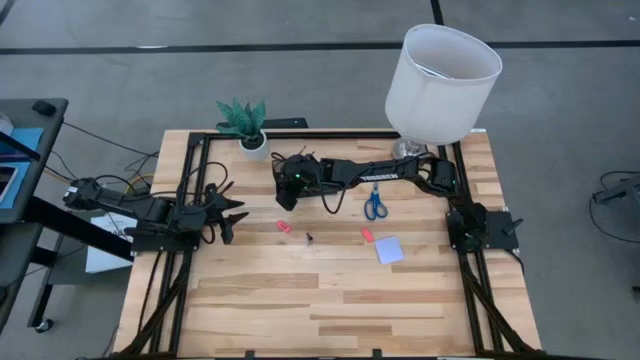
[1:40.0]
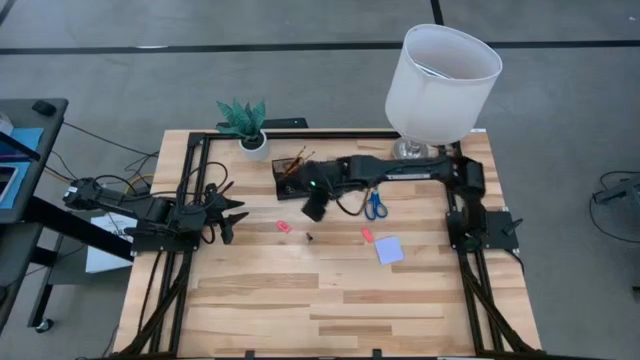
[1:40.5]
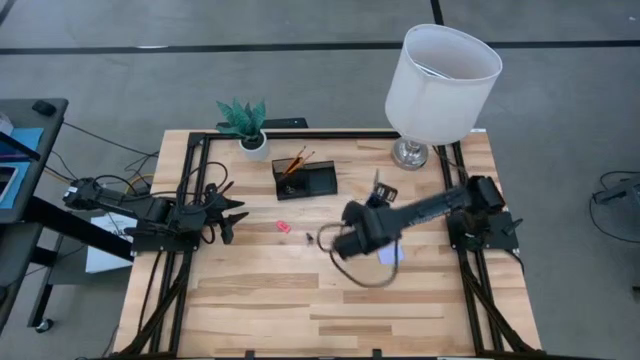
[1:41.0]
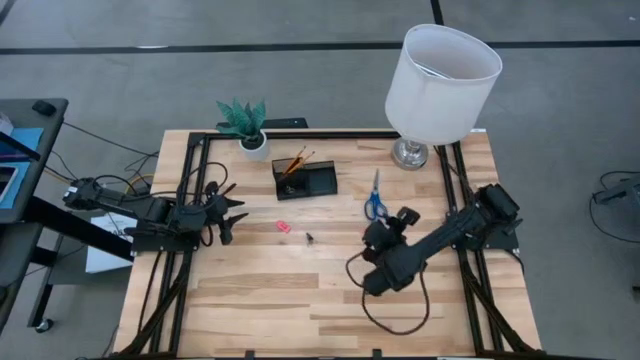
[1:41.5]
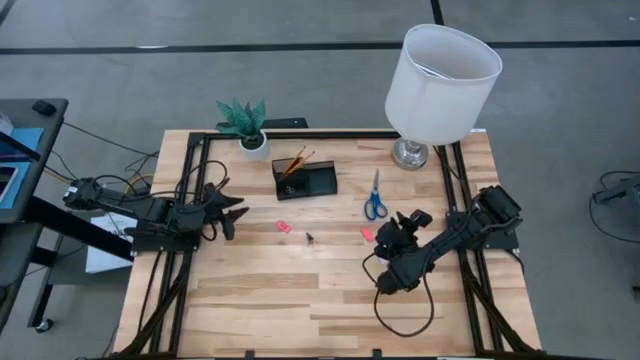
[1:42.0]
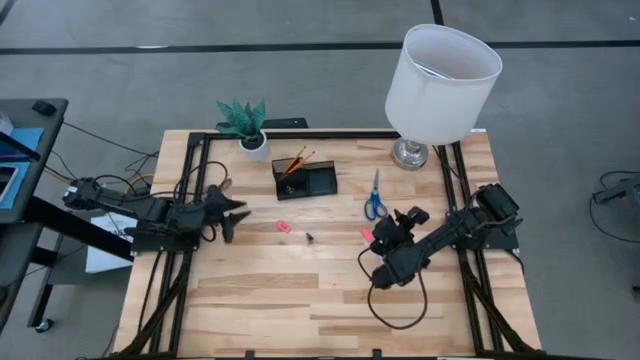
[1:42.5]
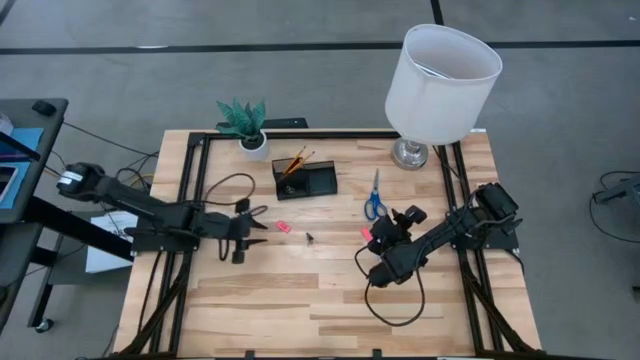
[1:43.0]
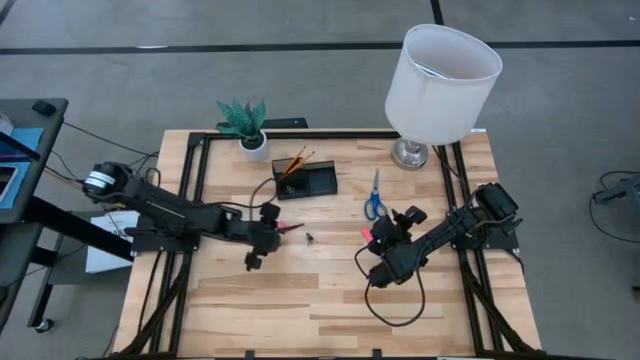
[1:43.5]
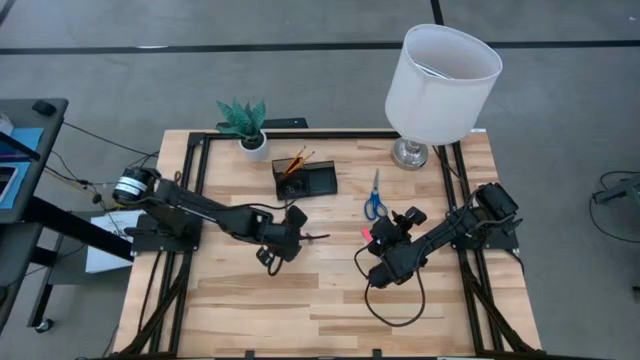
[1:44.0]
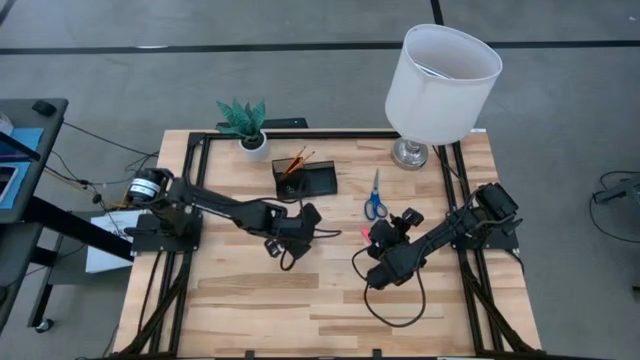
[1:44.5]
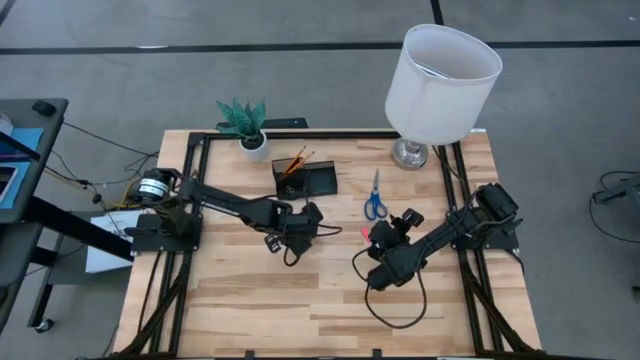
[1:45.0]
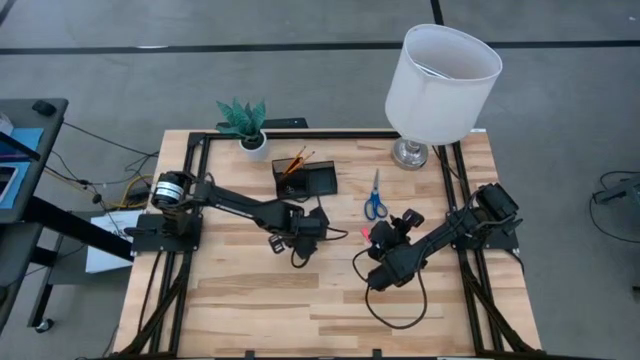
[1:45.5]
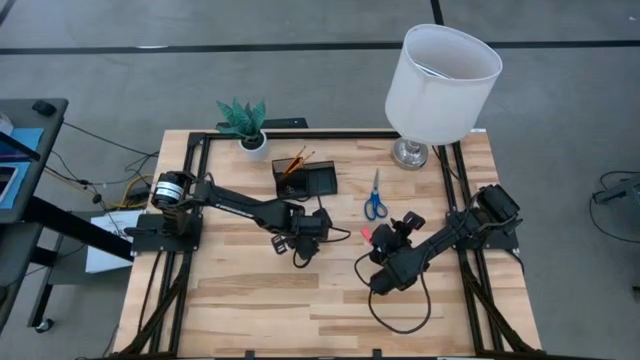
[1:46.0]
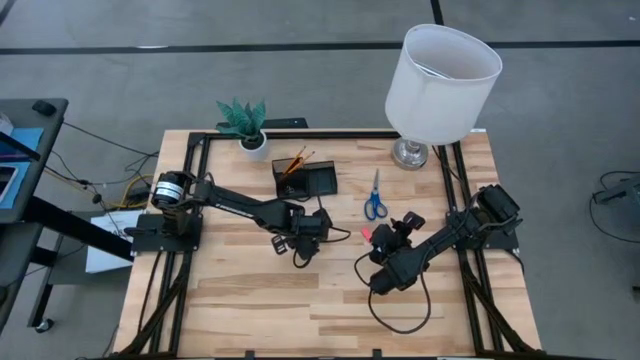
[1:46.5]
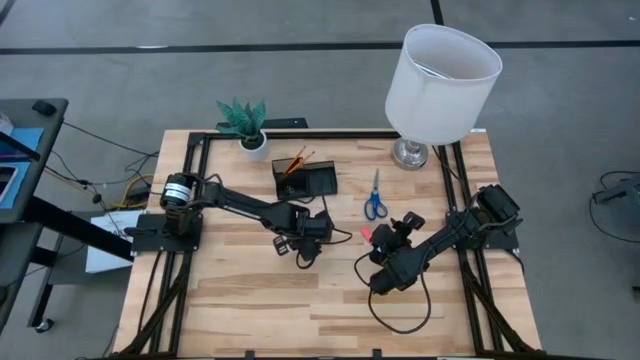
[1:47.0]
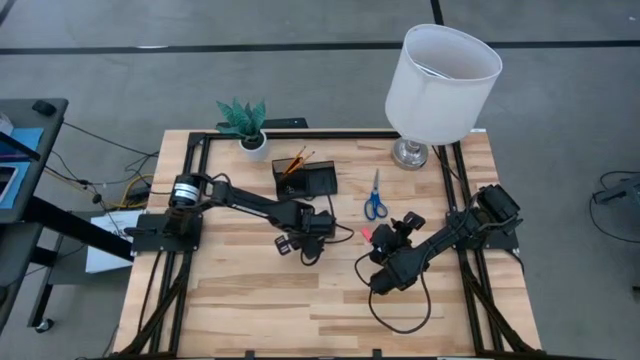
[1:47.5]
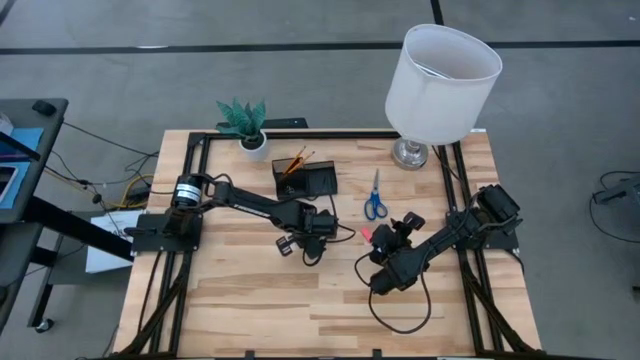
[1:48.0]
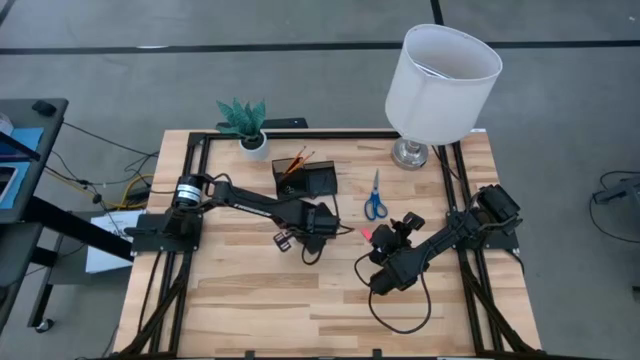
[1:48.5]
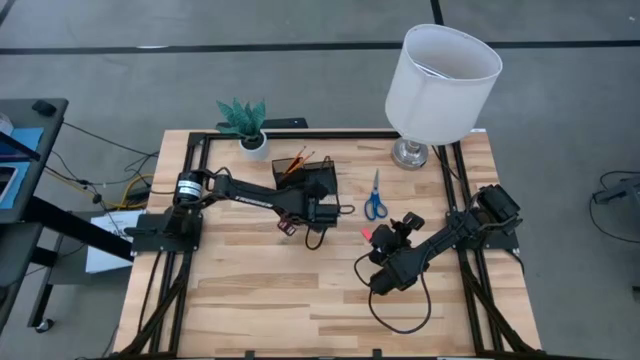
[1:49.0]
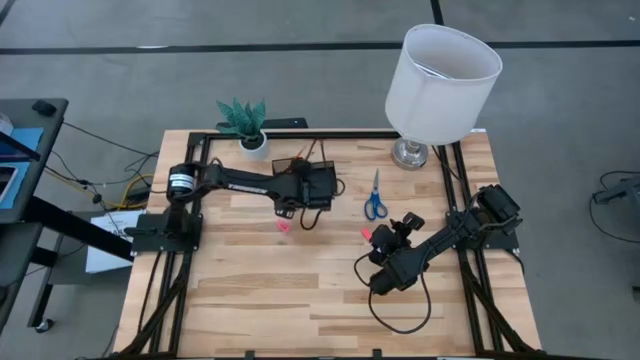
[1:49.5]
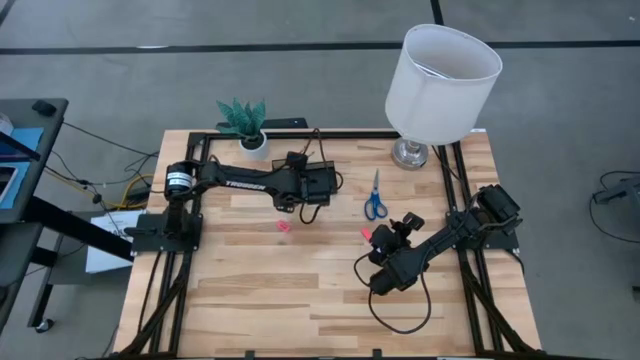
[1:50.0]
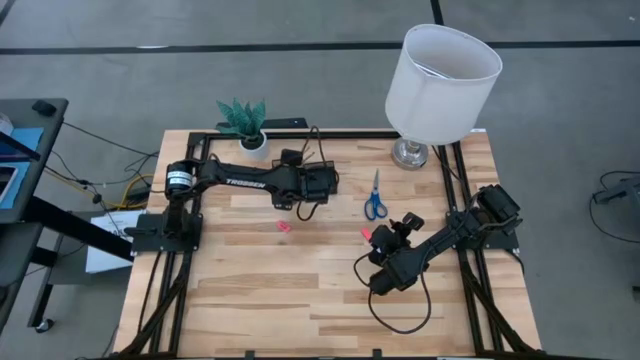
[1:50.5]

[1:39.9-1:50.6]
Task: Pick and place office supplies into organizer
Put the black binder clip into the black desk organizer

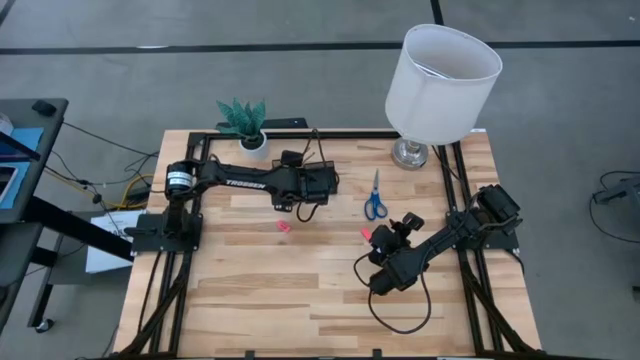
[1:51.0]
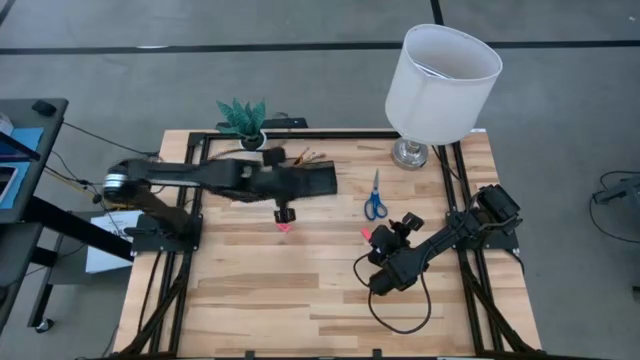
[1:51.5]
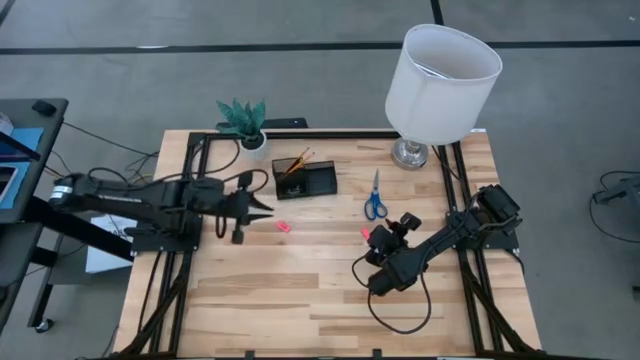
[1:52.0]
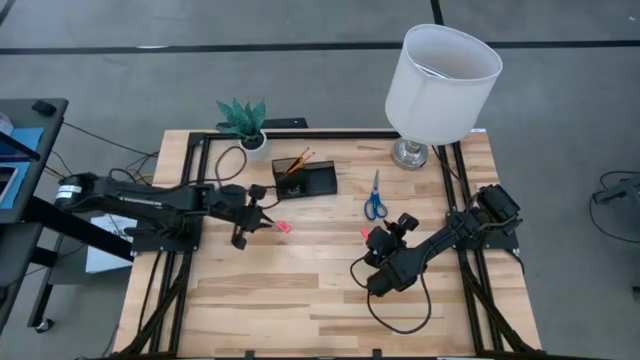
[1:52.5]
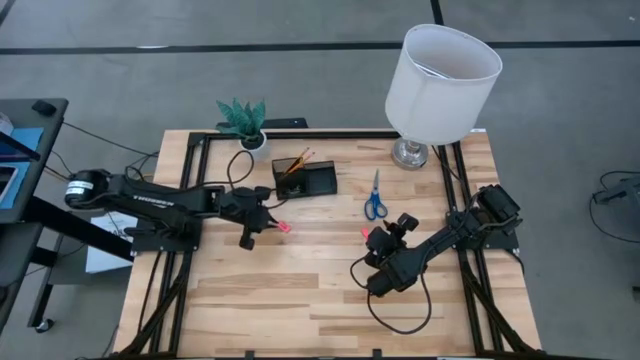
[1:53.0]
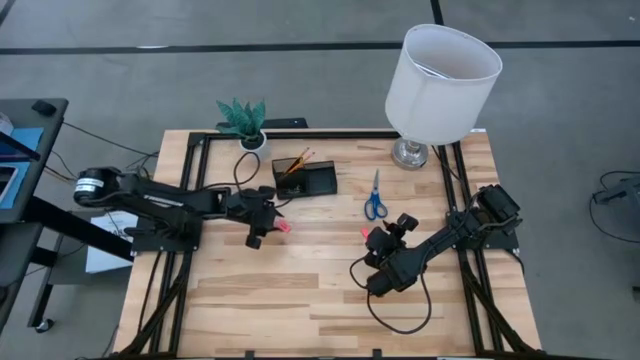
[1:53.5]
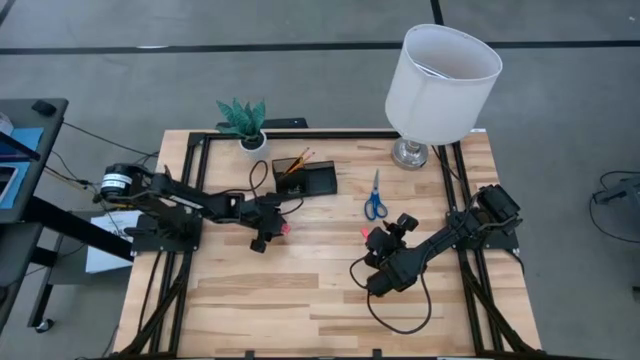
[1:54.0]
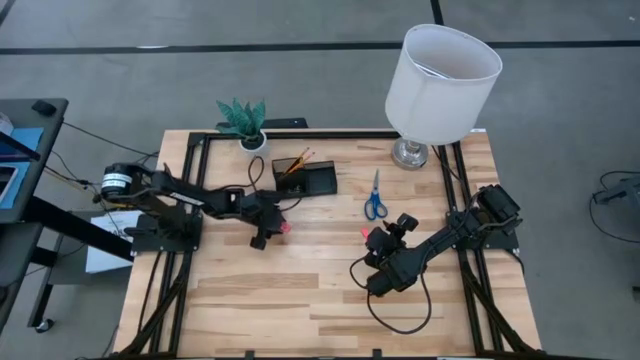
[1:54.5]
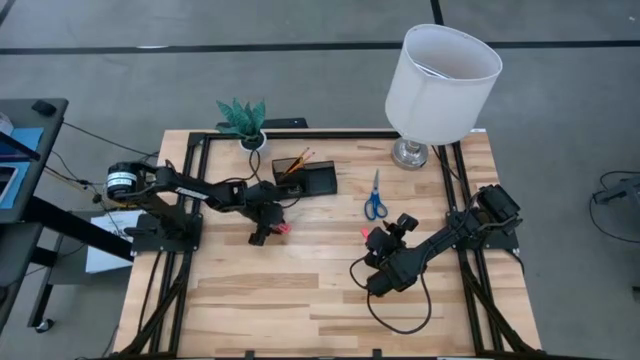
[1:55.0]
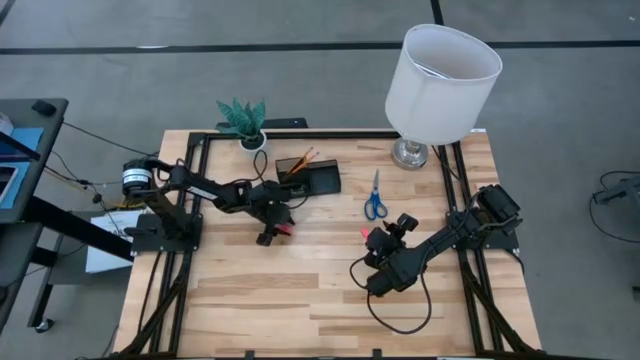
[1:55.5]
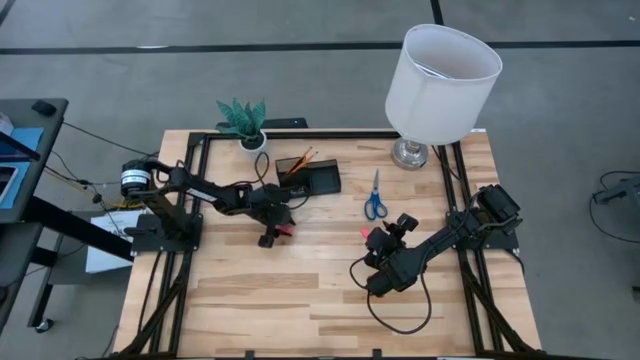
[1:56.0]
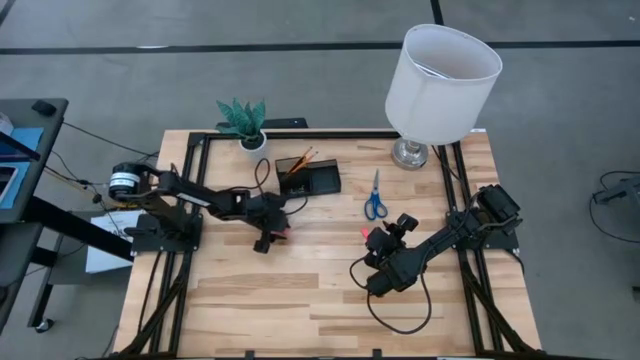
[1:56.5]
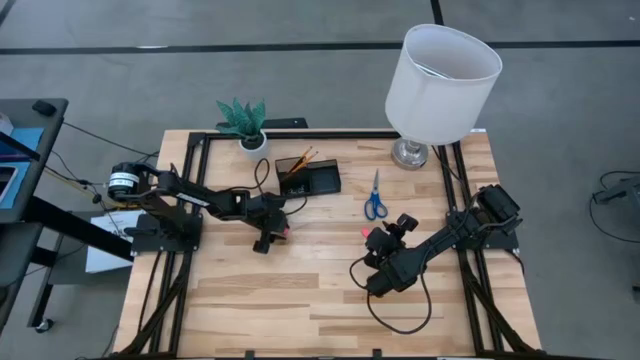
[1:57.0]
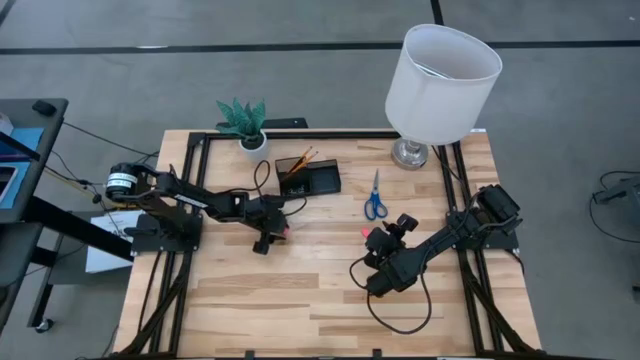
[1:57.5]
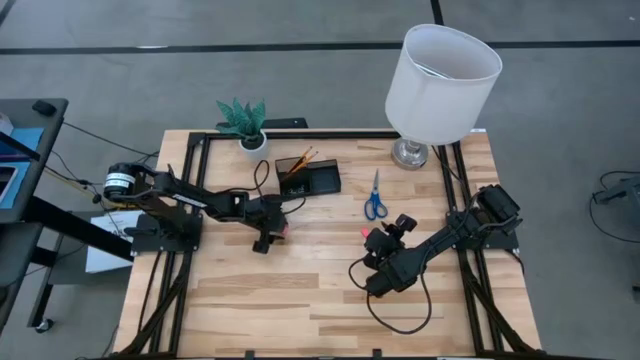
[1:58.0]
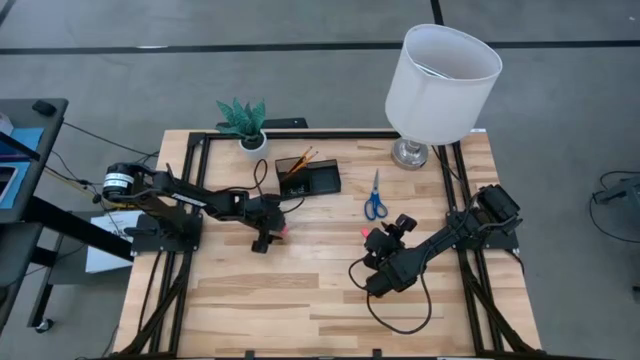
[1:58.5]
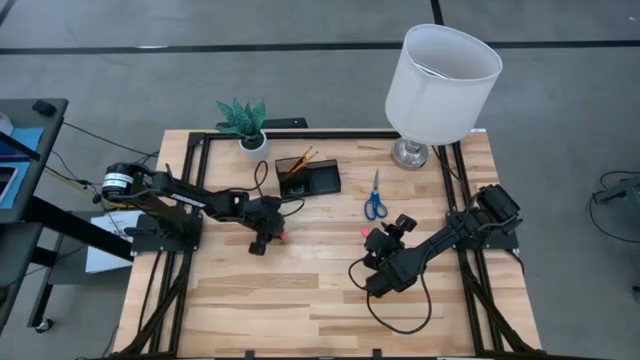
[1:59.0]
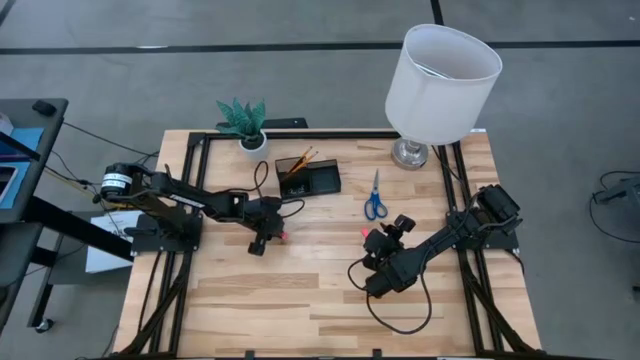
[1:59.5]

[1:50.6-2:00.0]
Put the left pink eraser into the black desk organizer
